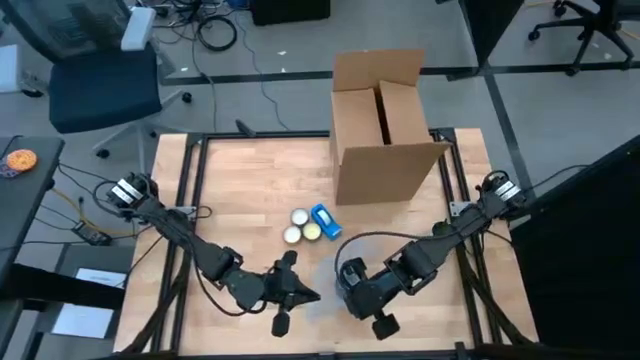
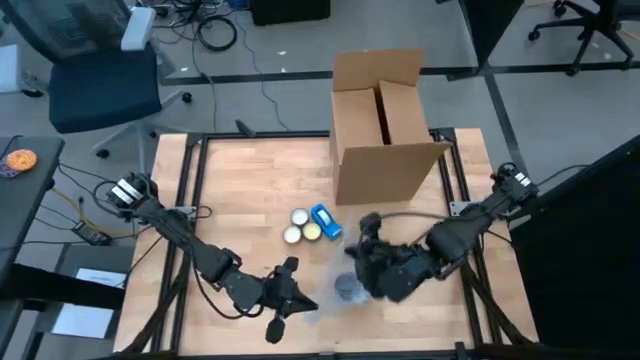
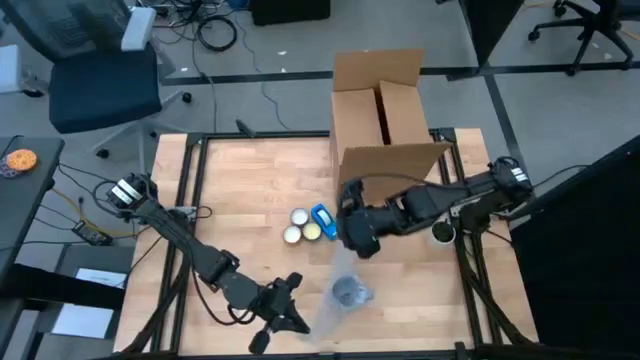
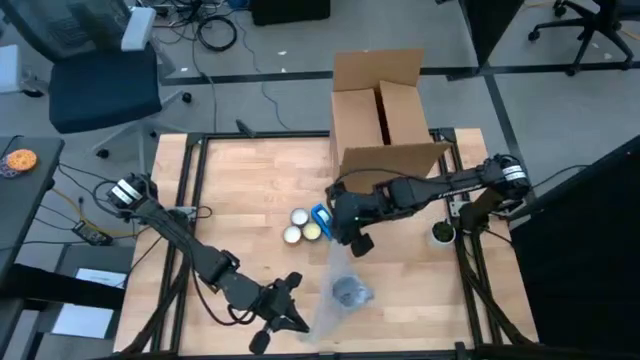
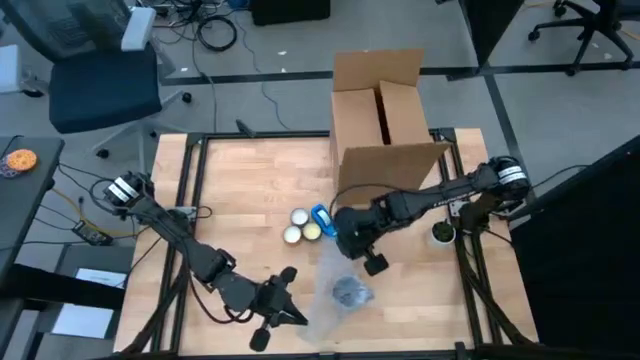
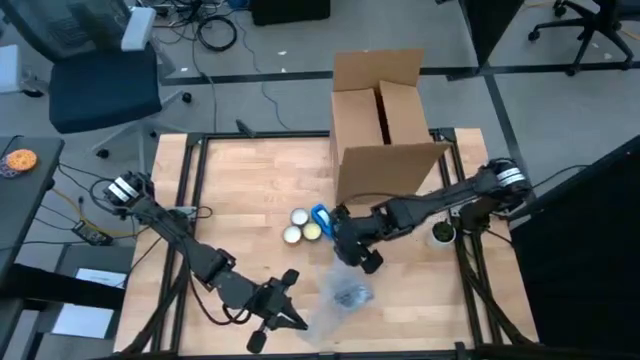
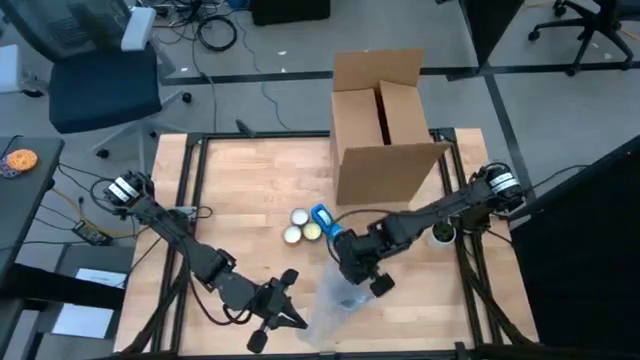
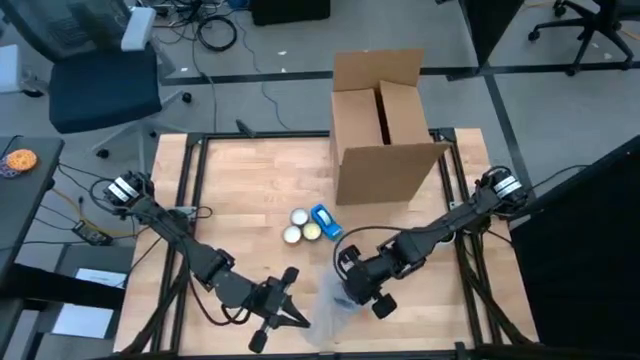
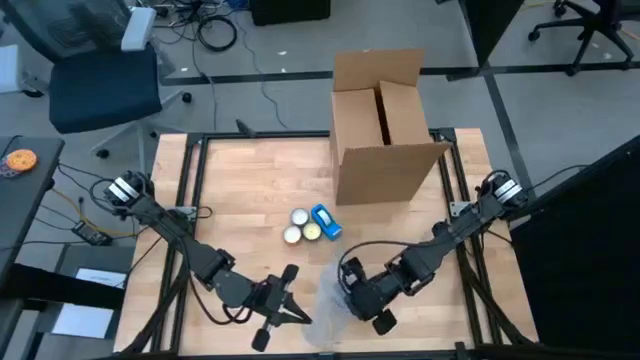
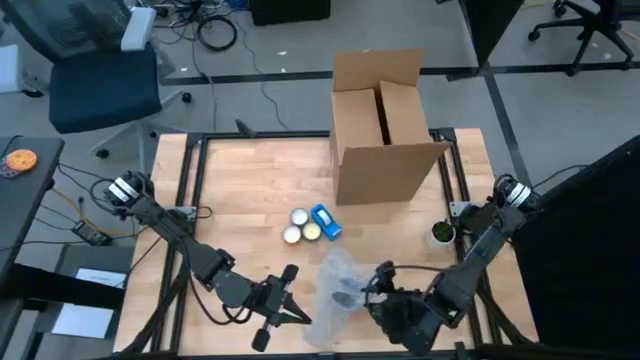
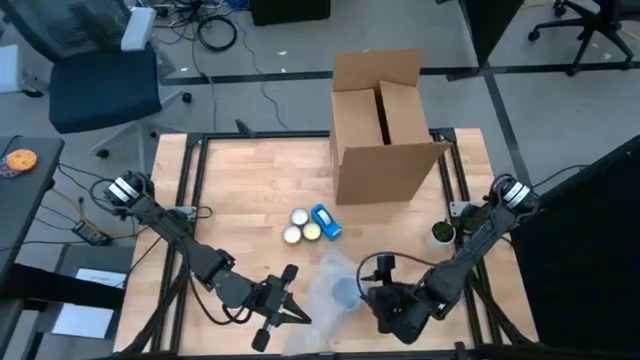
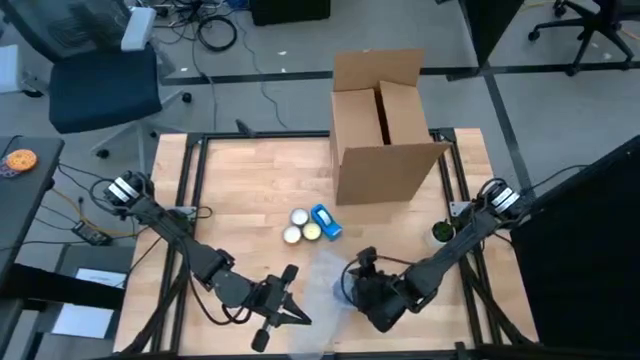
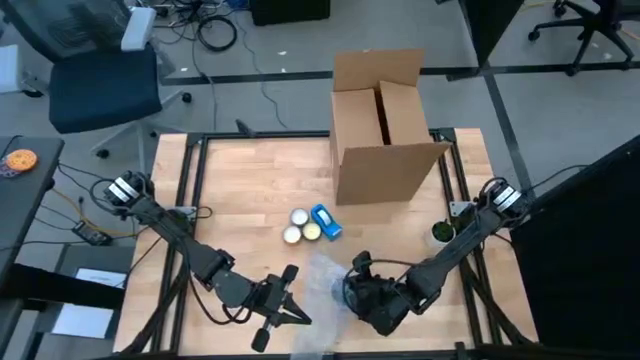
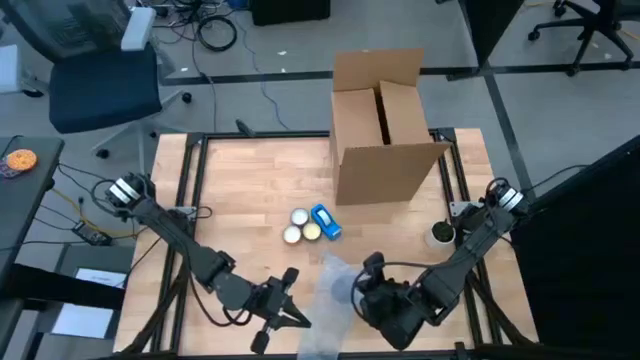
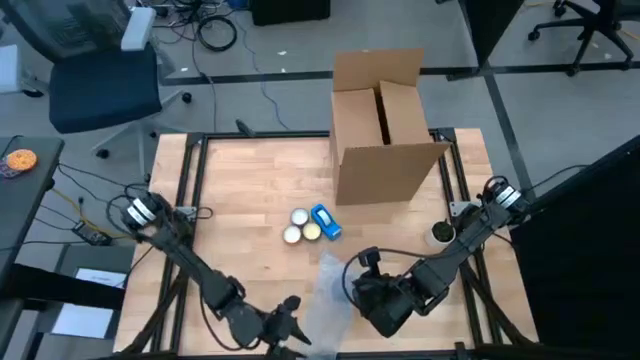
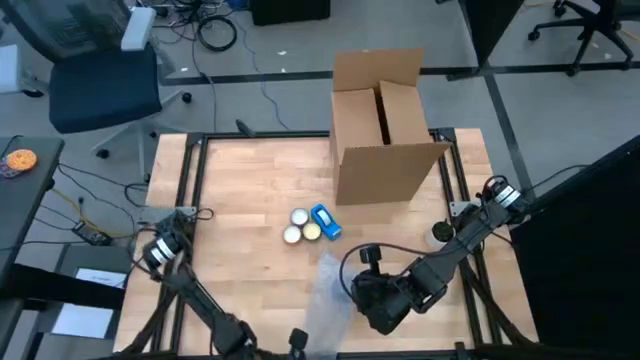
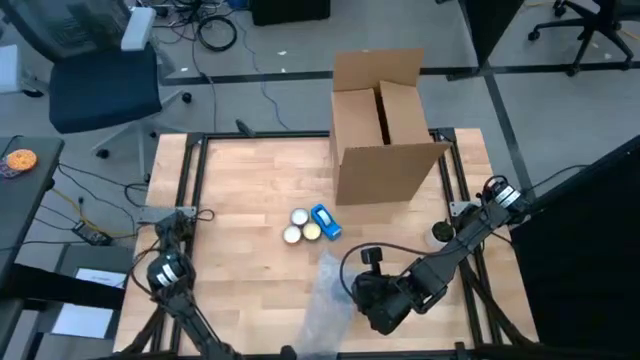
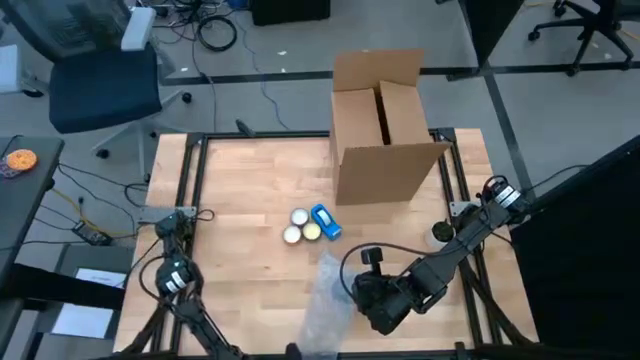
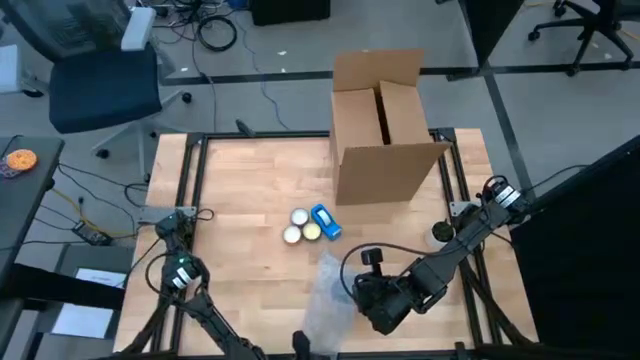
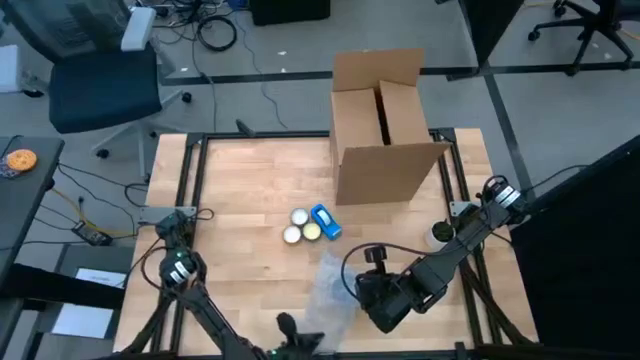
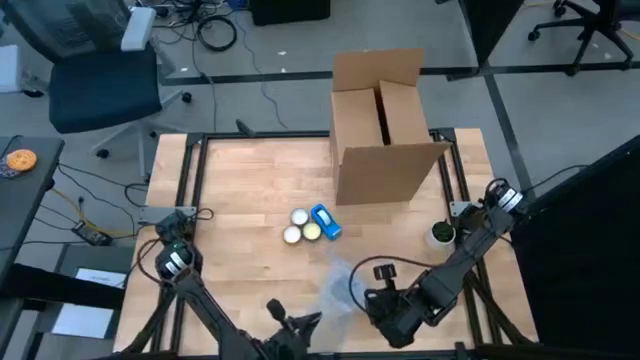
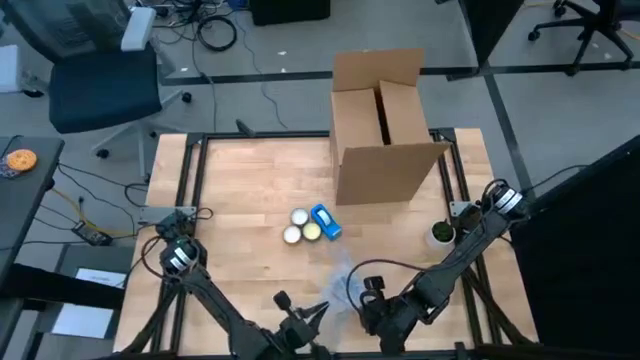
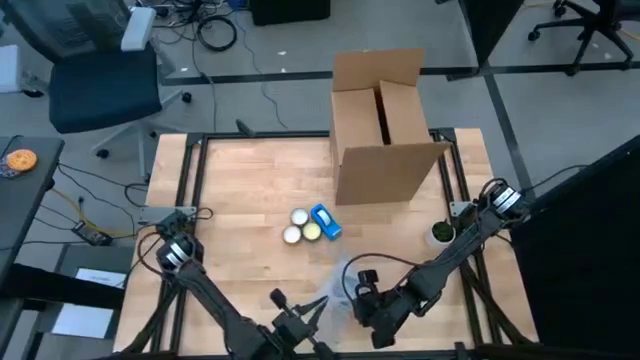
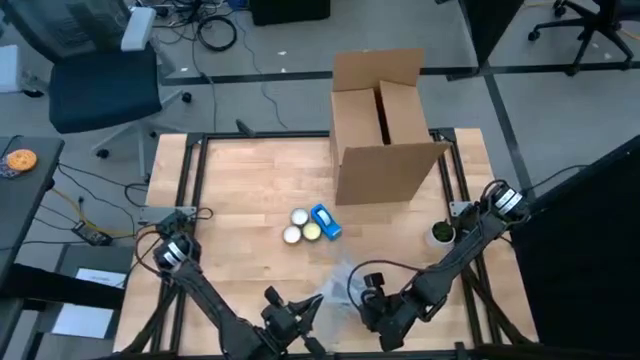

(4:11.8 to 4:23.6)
Task: wrap mug
Wrap the purple mug with the transparent bubble wrap

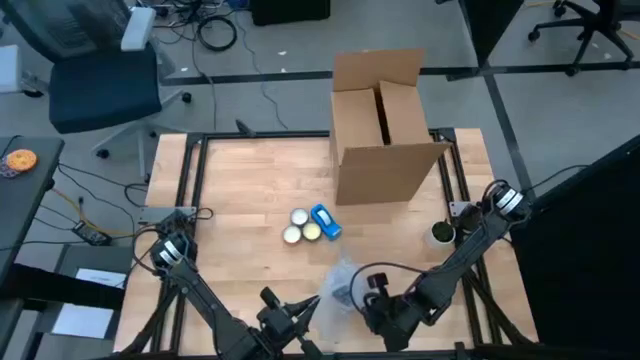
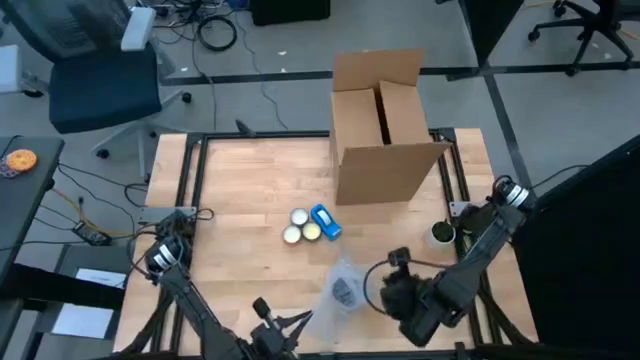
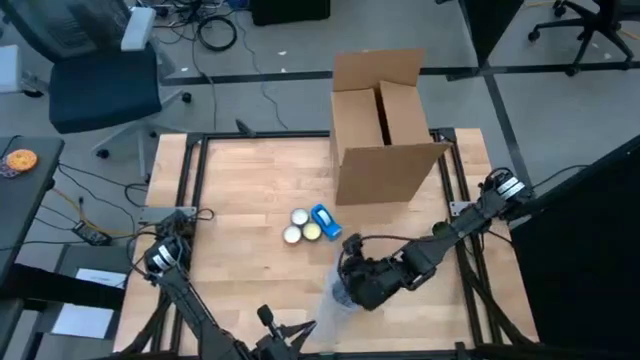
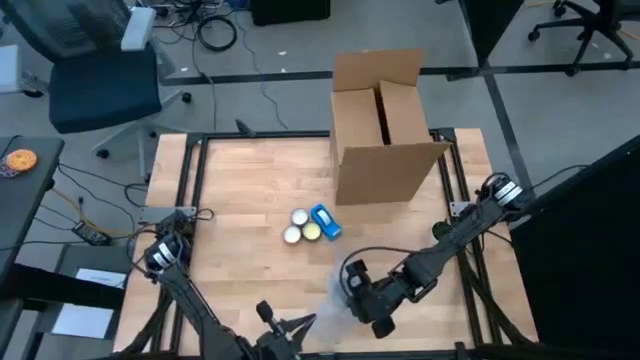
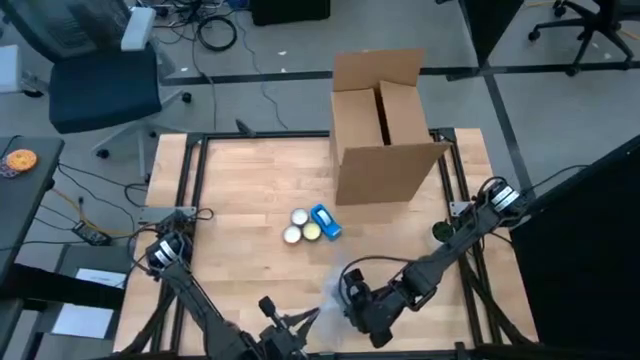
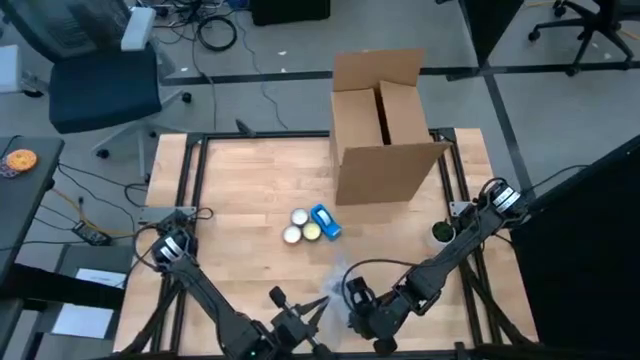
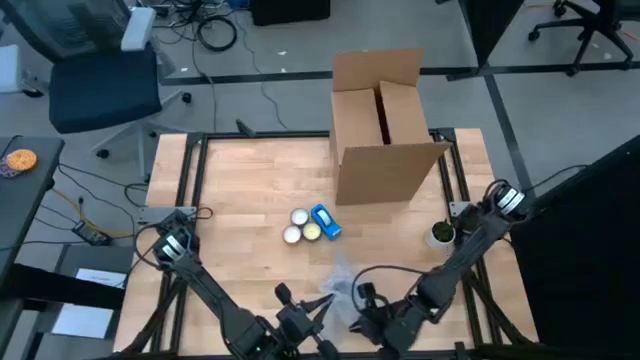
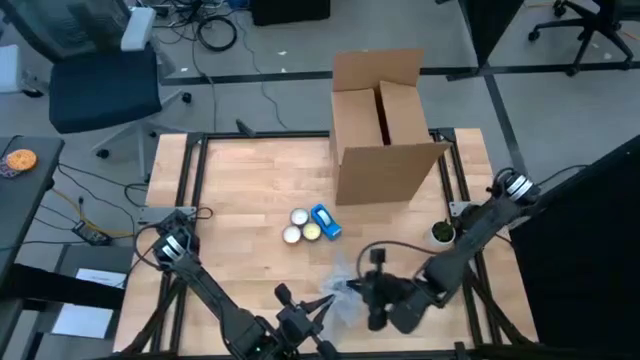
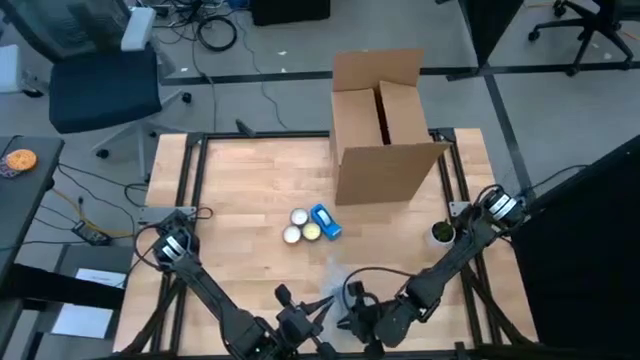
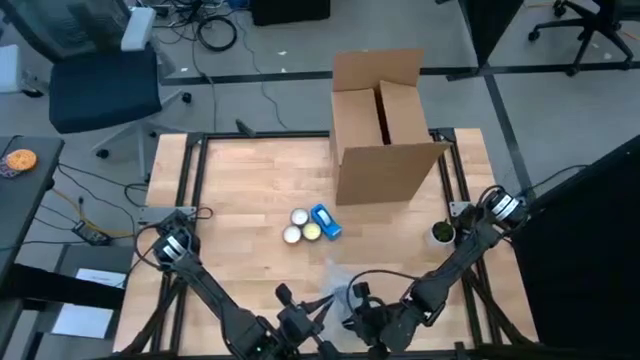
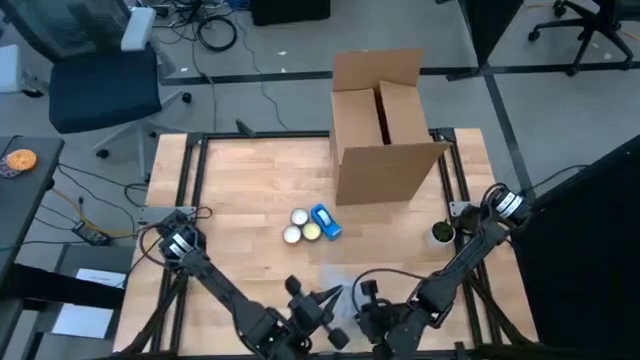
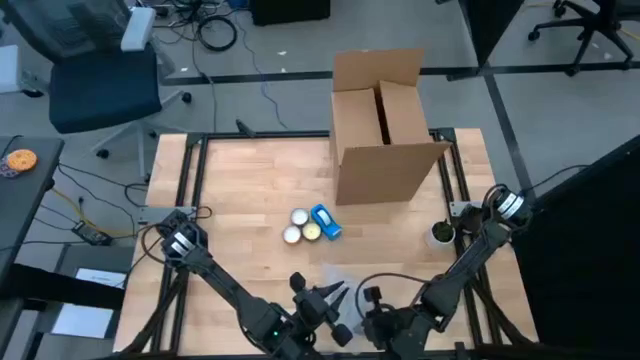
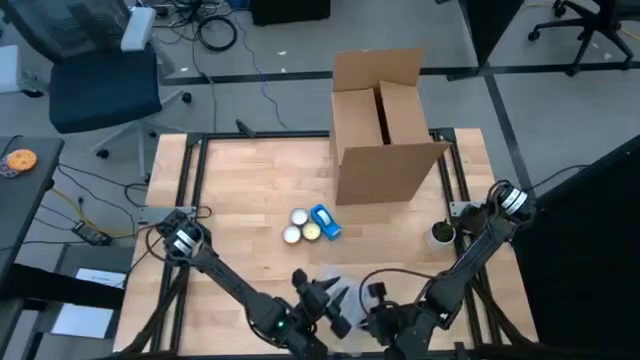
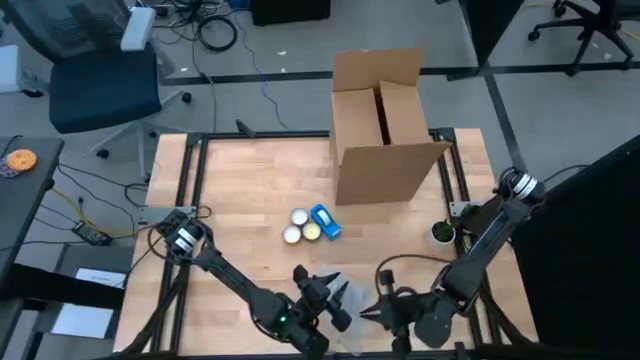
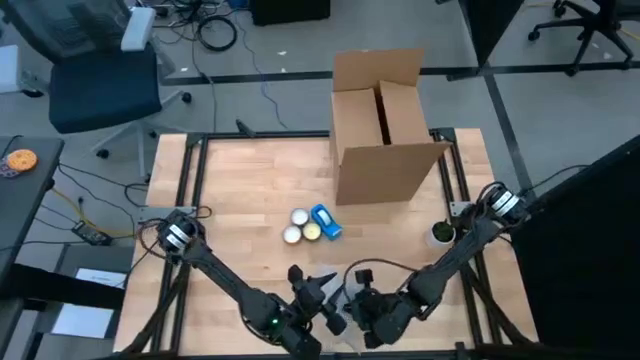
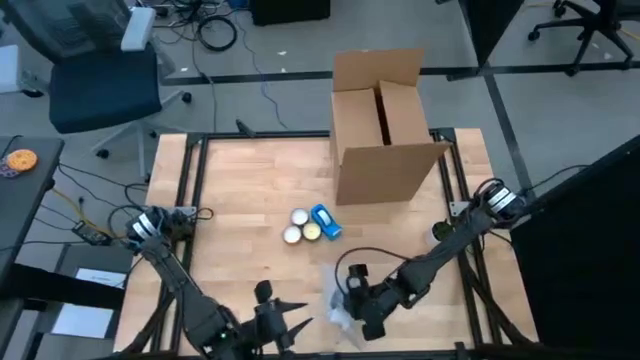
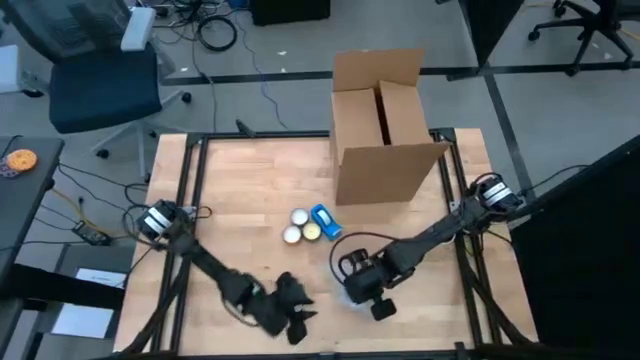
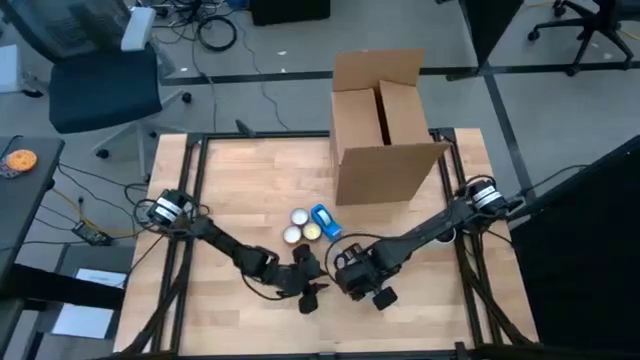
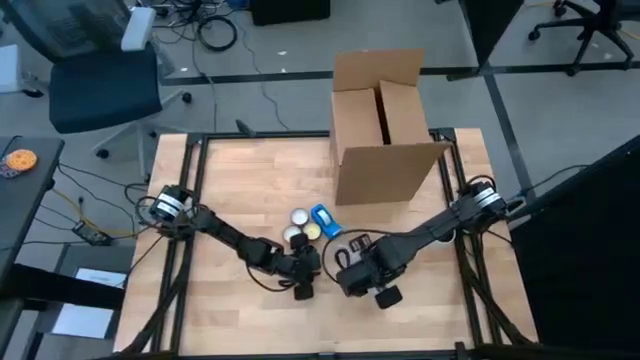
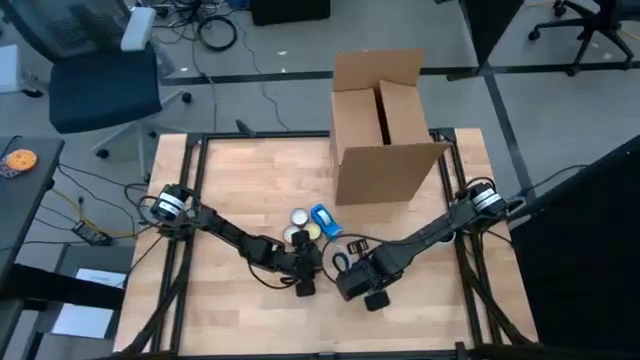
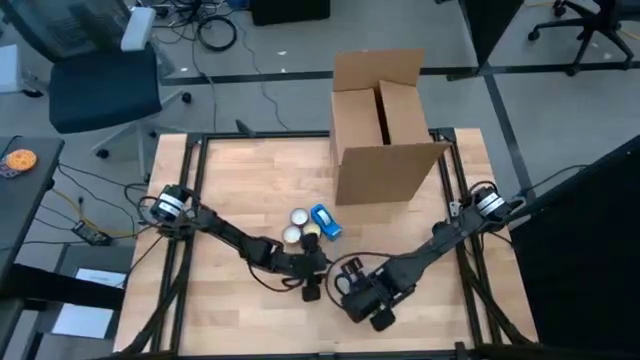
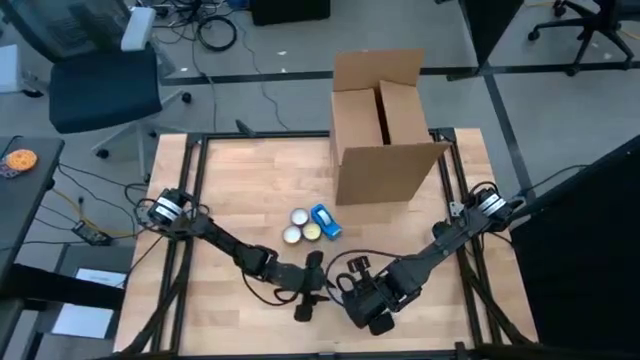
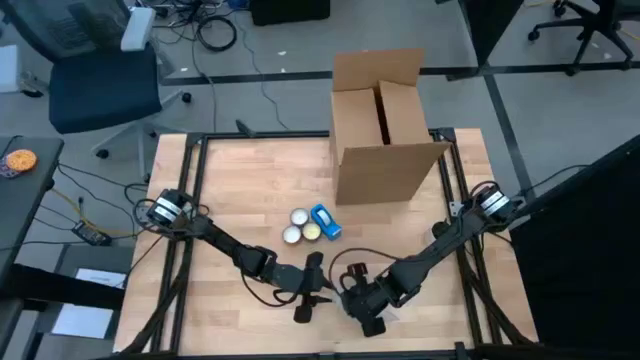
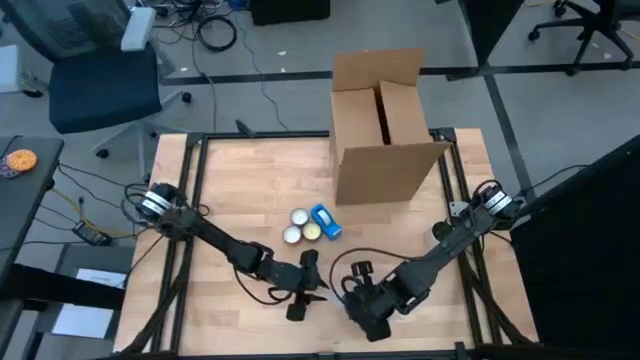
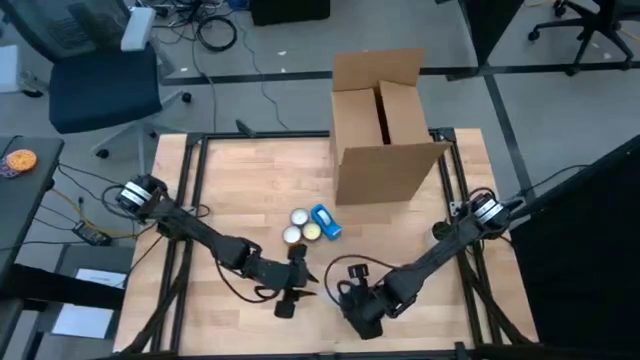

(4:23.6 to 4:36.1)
Wrap the purple mug with the transparent bubble wrap
